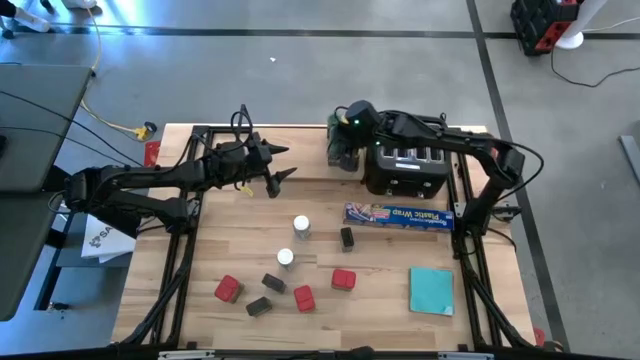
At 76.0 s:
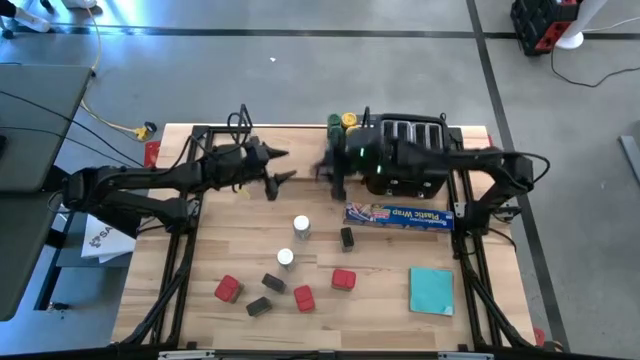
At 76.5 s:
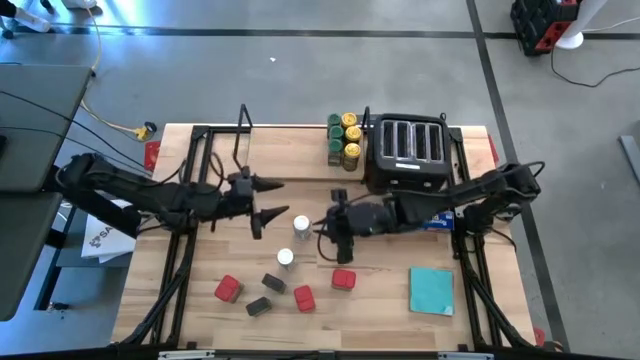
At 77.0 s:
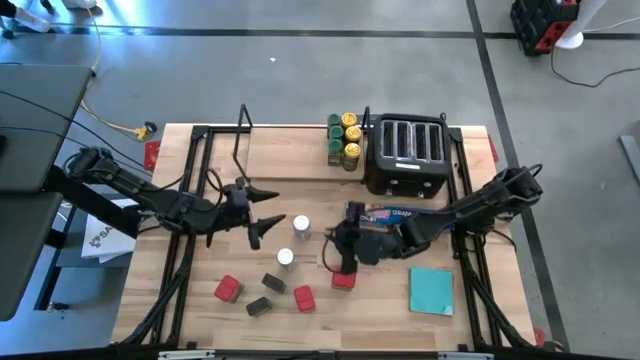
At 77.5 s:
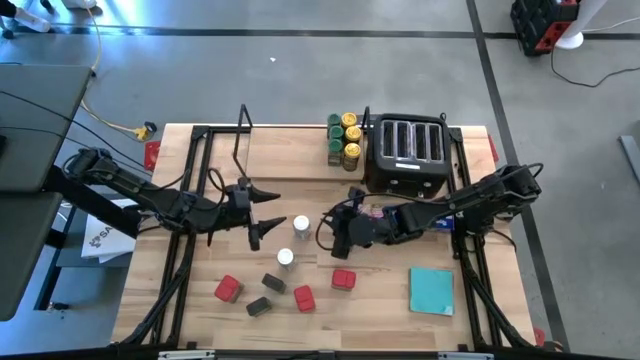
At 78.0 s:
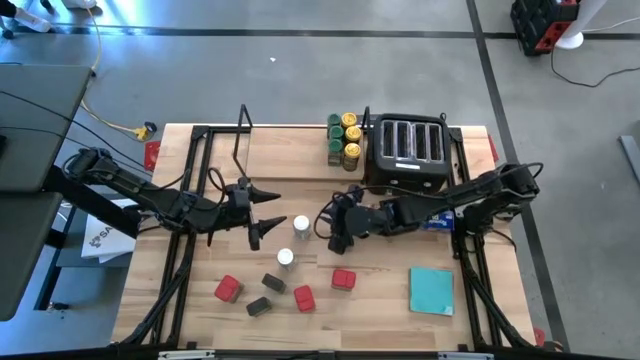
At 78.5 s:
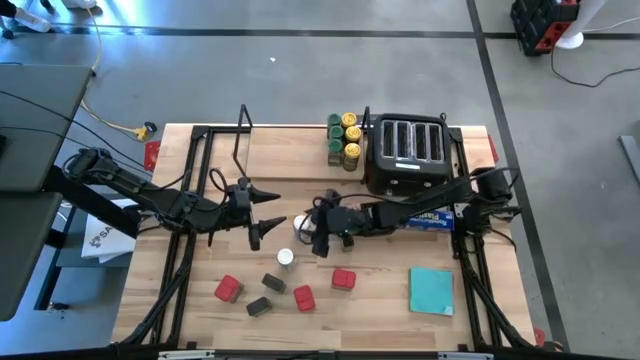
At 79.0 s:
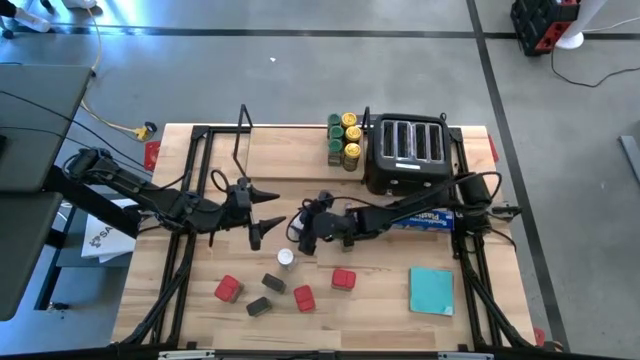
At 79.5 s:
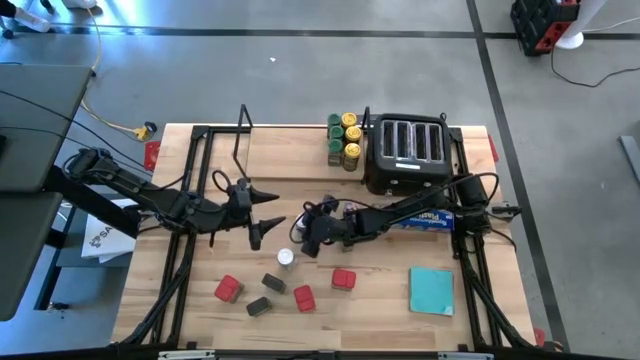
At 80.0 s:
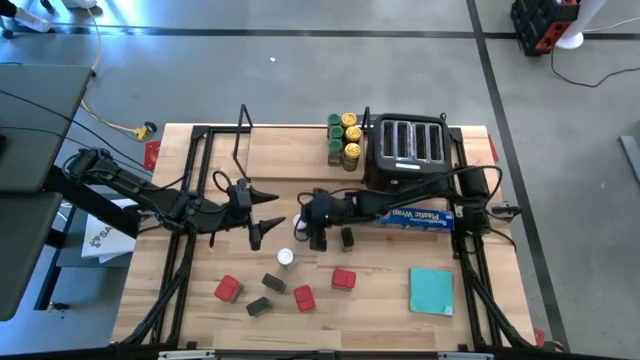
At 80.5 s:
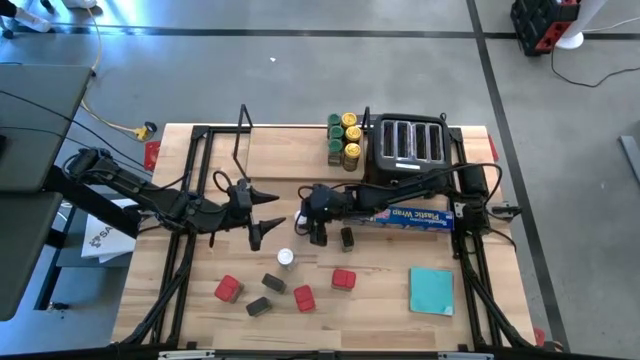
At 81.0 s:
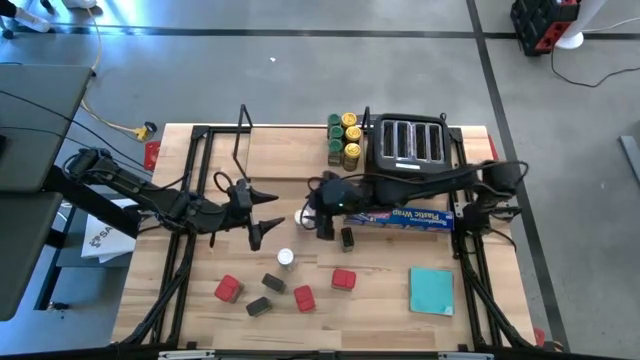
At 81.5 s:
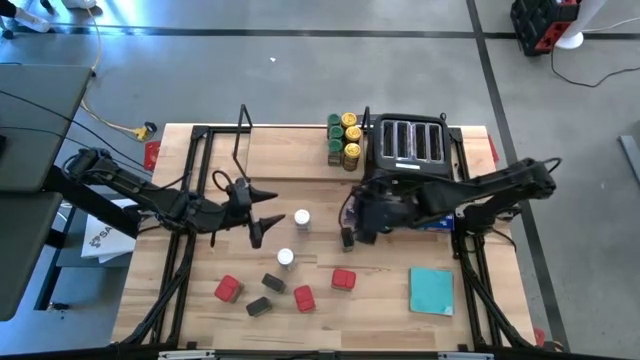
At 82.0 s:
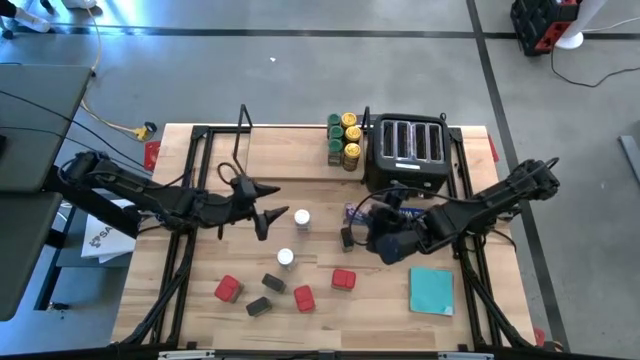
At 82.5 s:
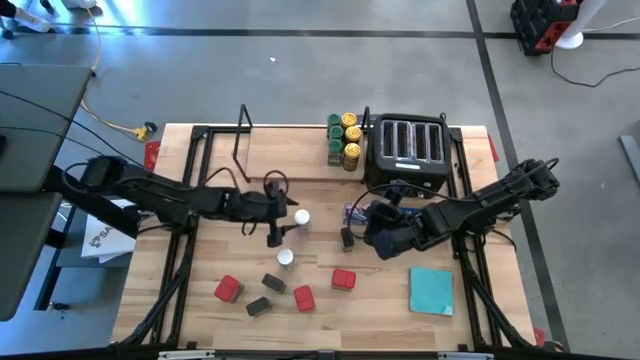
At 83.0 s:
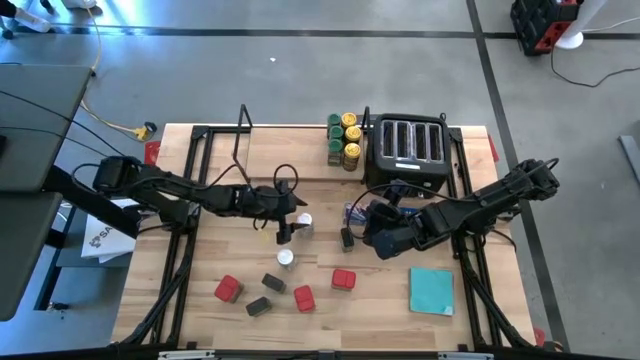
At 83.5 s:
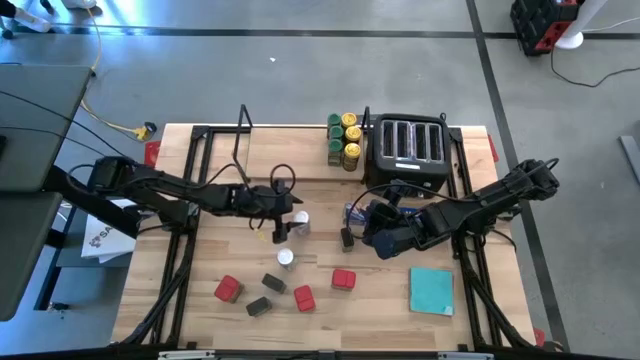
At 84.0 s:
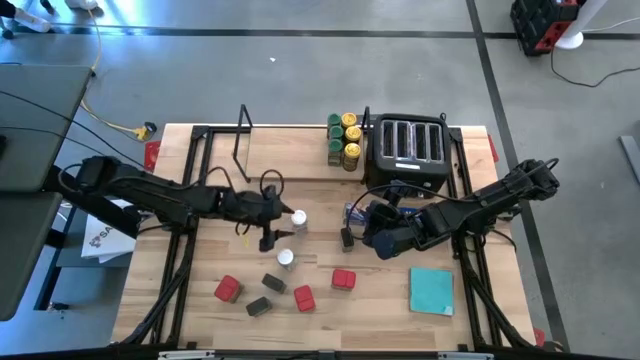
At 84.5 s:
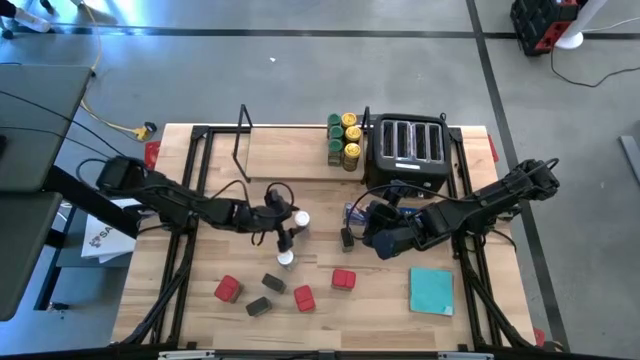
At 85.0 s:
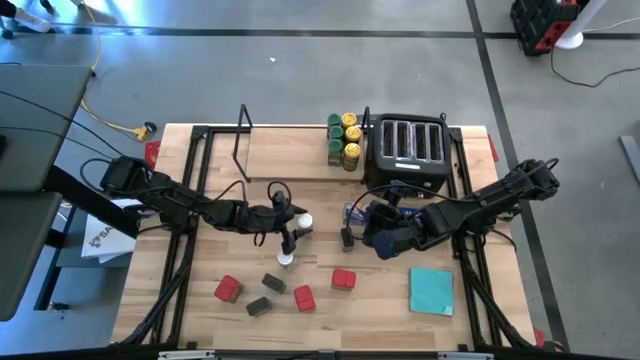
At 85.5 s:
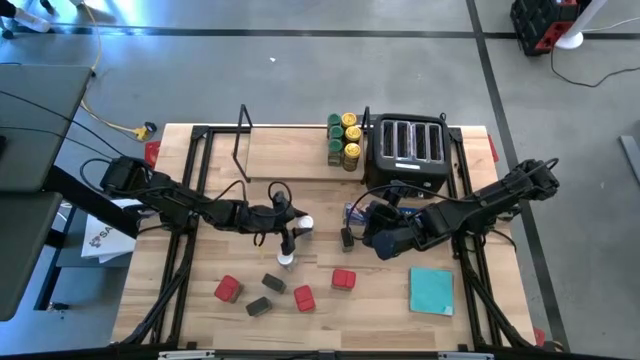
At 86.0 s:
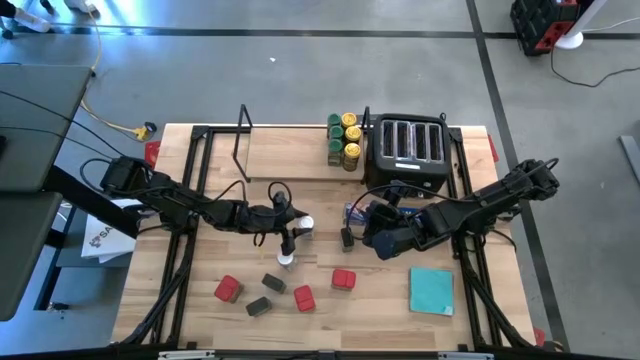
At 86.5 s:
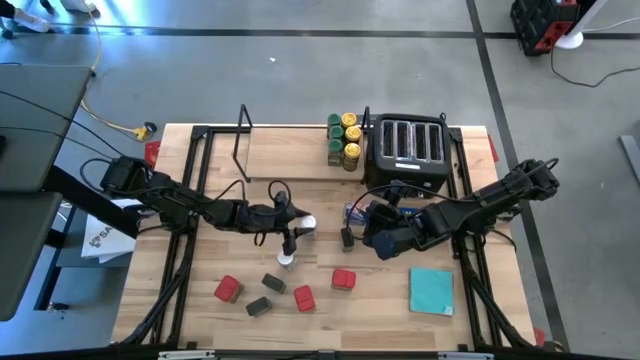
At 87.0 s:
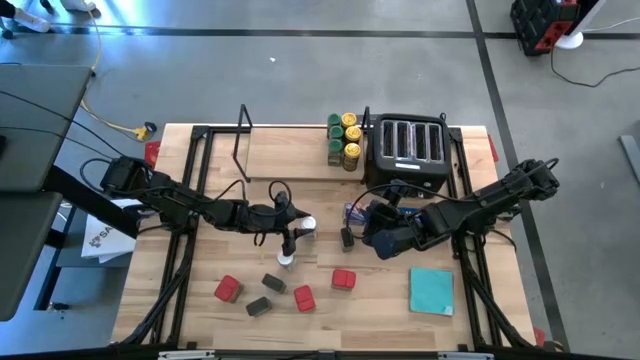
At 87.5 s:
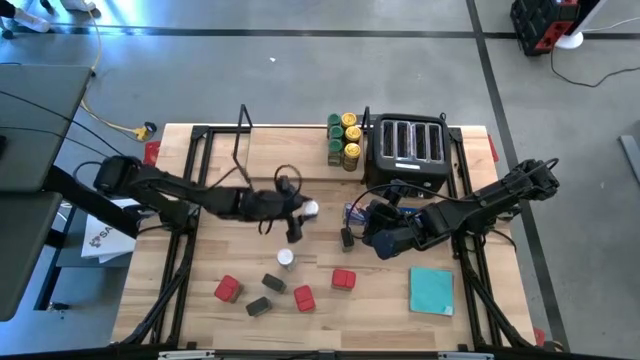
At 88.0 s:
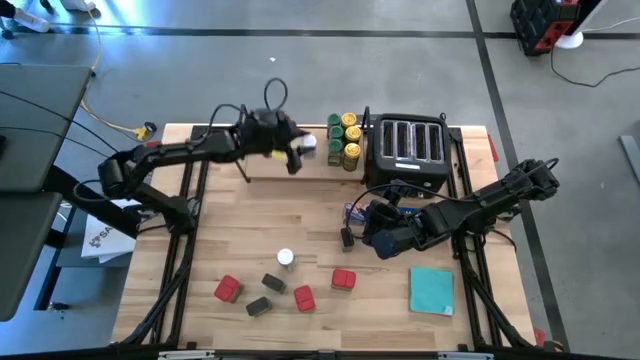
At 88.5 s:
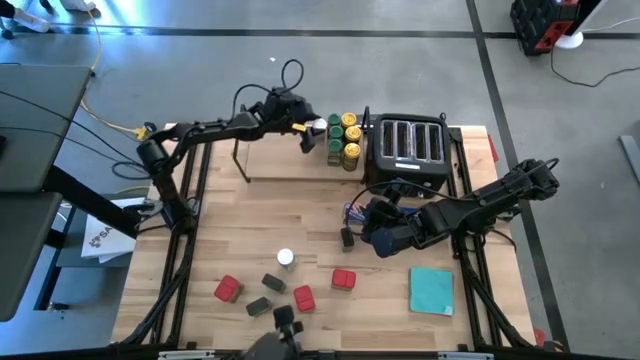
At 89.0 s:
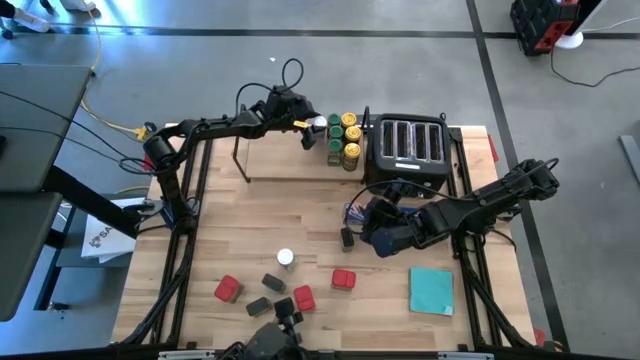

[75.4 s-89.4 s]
Task: Shelf spices
Put the top white seasoning bottle on the shelf

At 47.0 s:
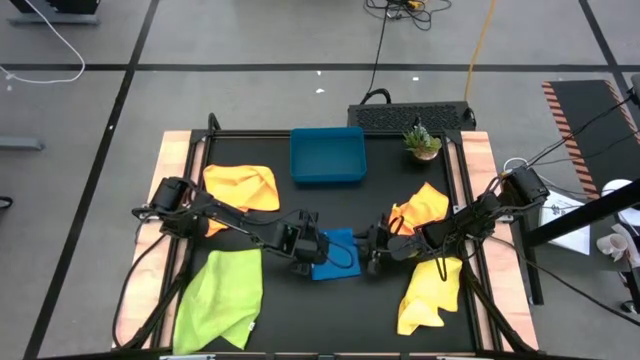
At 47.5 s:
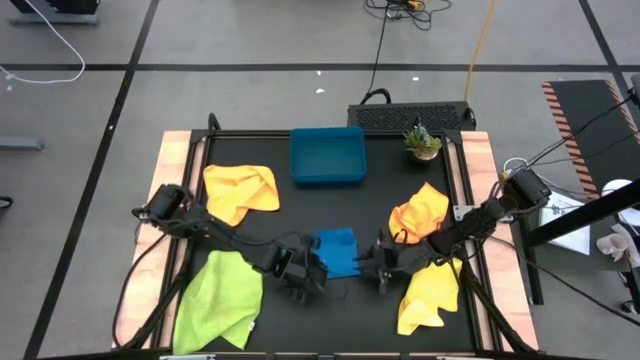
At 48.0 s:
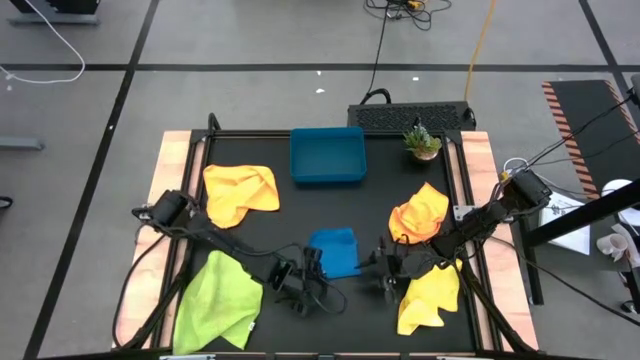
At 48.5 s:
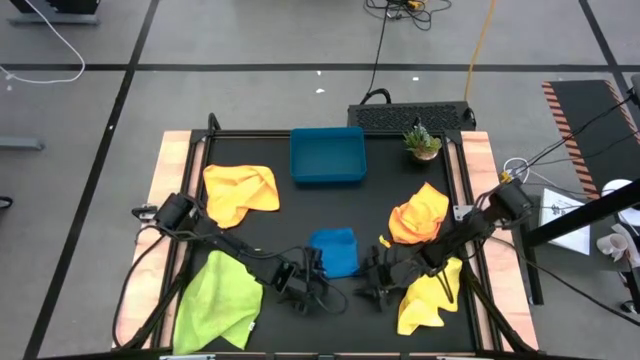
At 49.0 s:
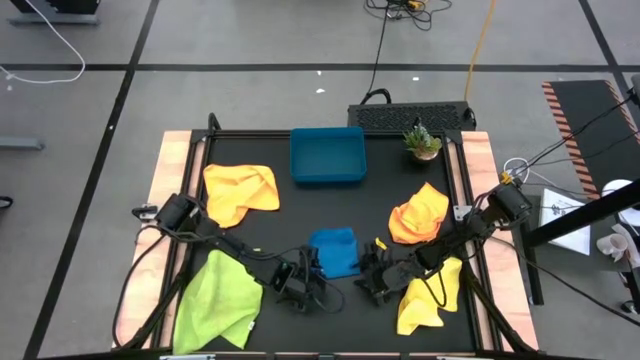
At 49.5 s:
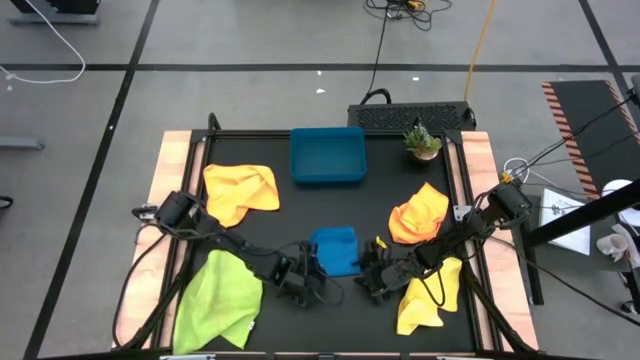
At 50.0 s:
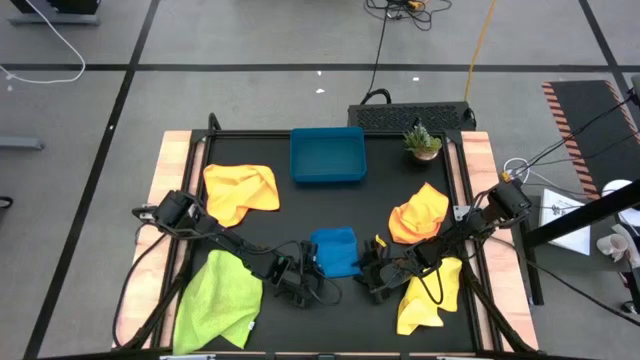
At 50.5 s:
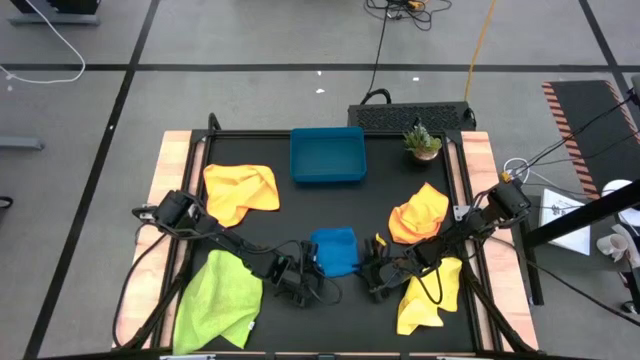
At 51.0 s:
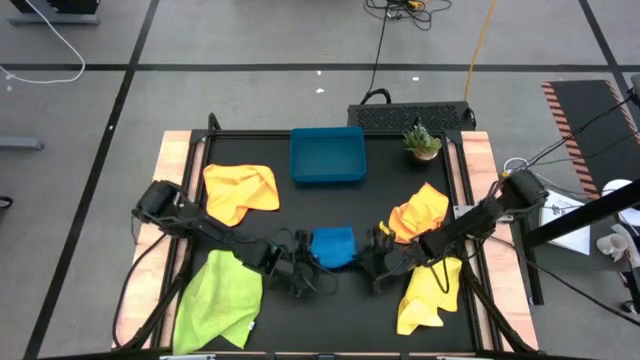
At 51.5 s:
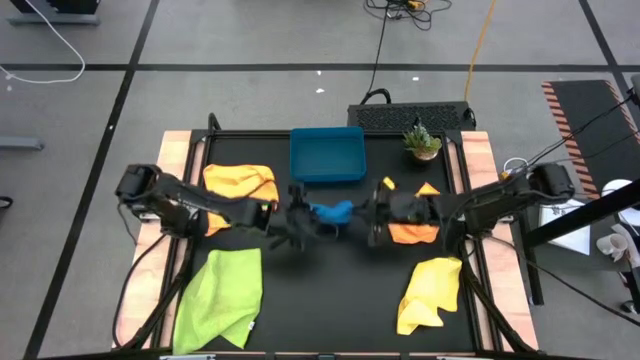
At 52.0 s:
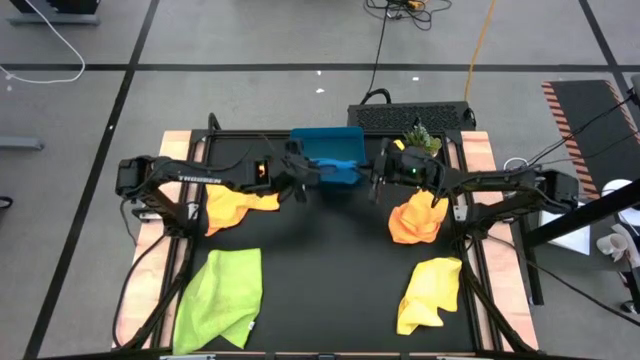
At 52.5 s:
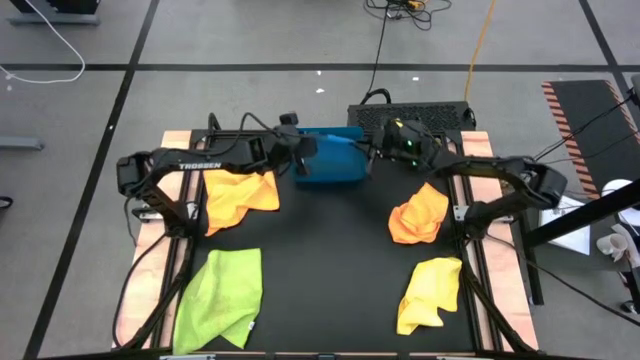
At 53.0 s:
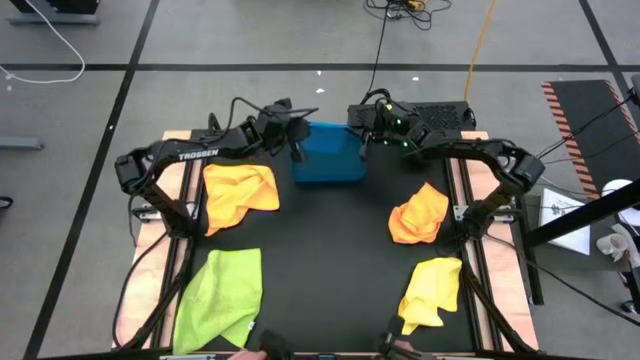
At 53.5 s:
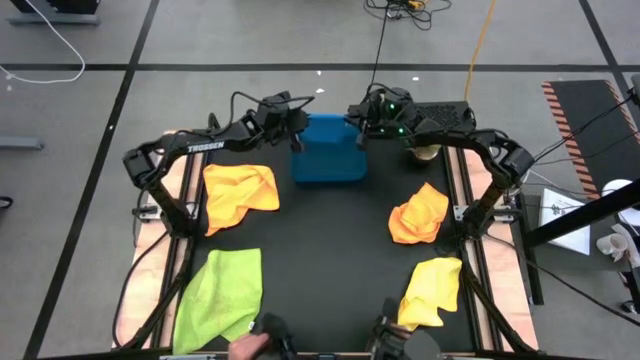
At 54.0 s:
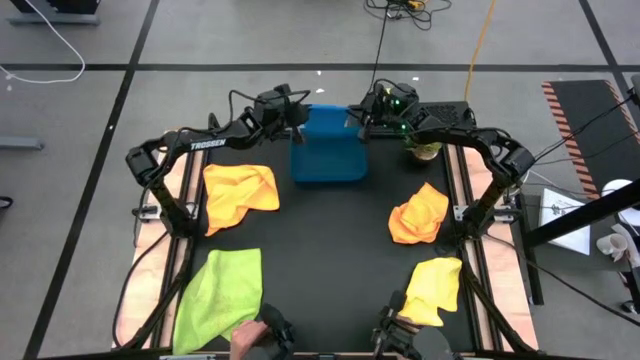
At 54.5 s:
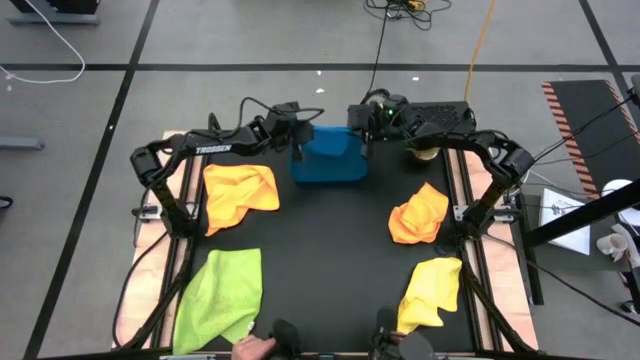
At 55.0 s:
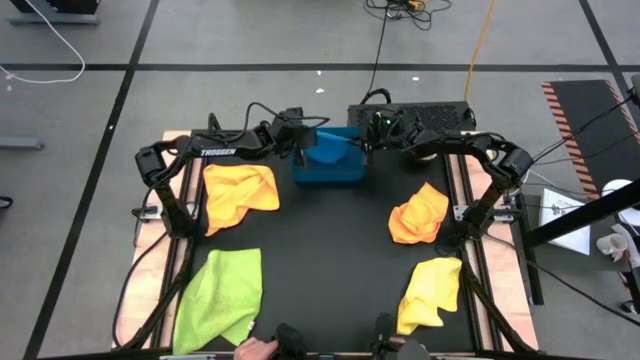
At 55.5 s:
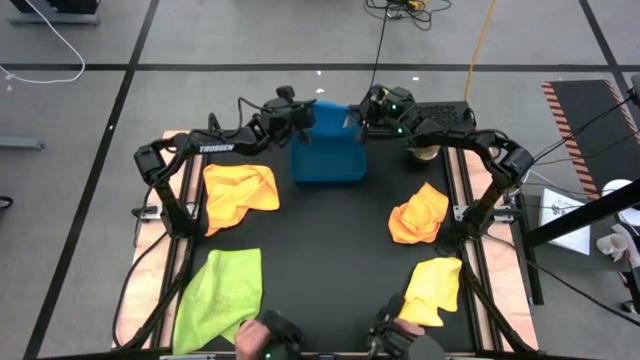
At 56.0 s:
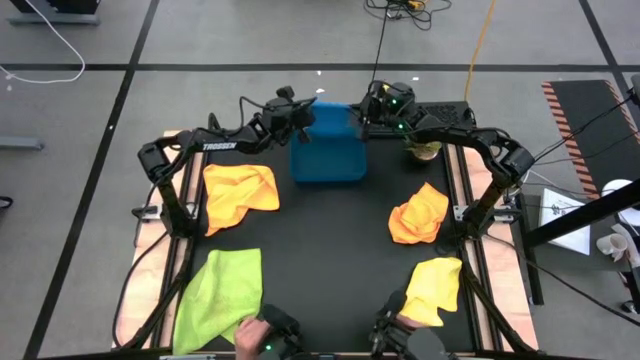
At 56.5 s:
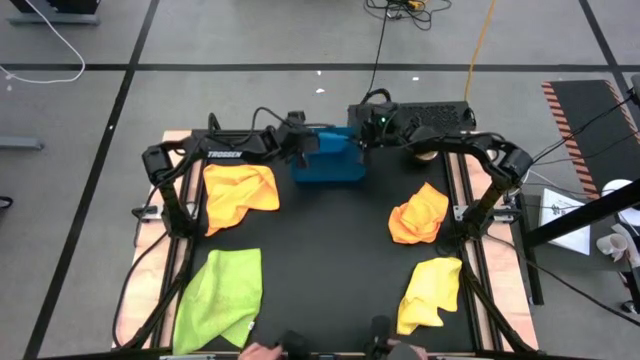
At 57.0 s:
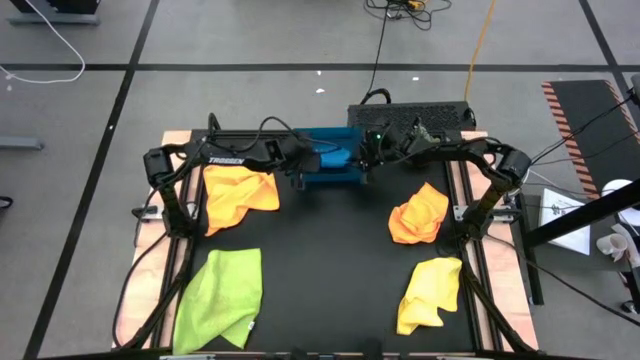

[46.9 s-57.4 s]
Task: Fold microfiber towels
Put the blue microfiber cloth into the dark blue bin
